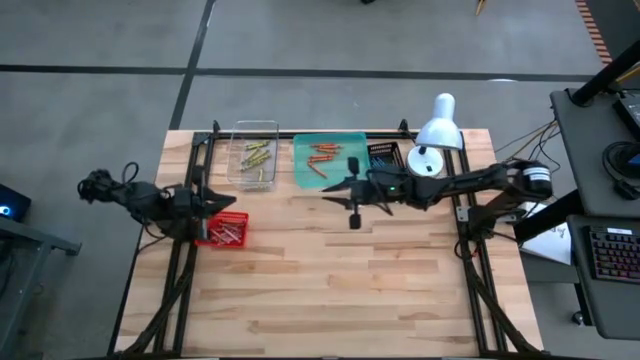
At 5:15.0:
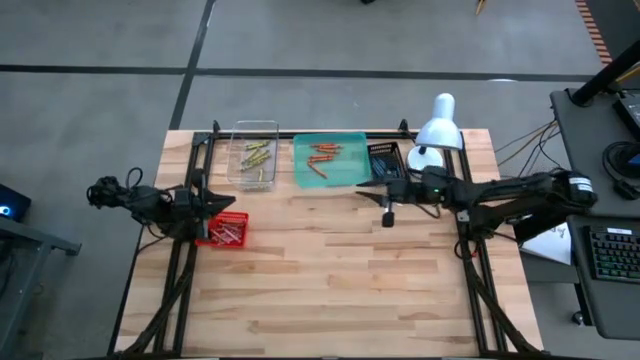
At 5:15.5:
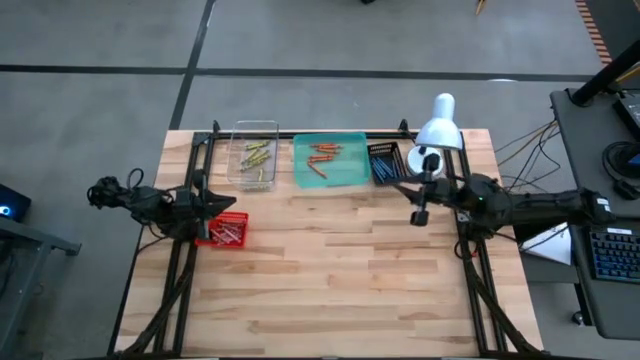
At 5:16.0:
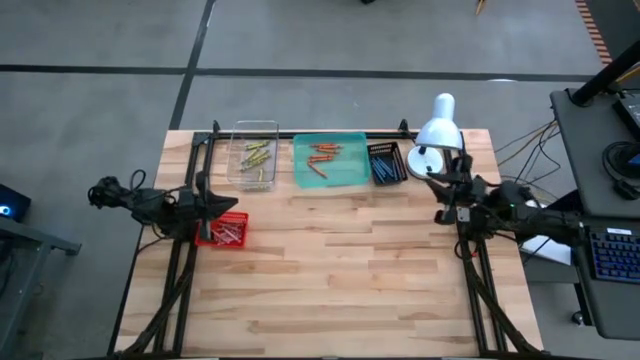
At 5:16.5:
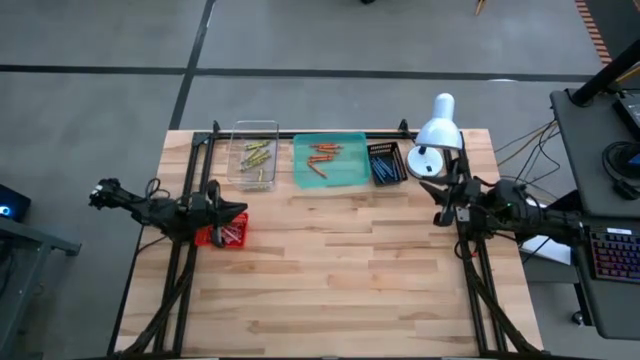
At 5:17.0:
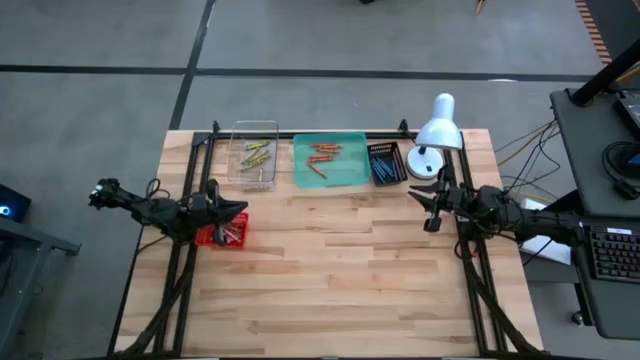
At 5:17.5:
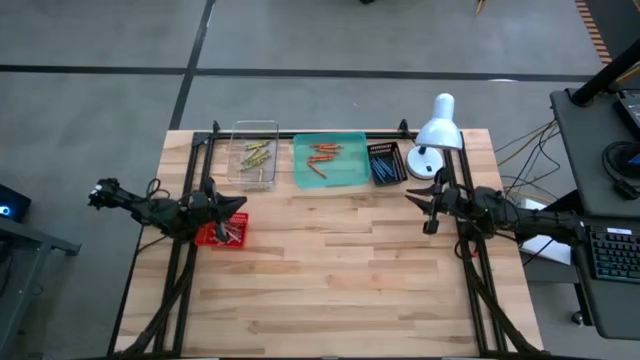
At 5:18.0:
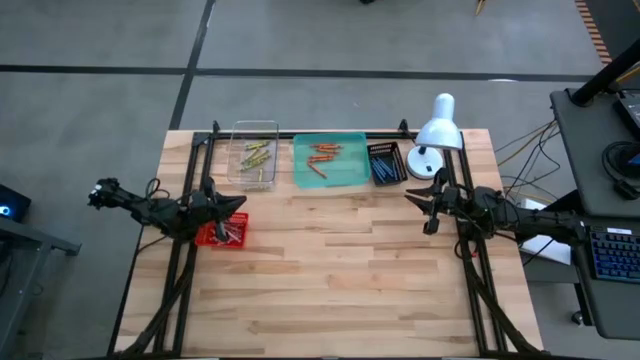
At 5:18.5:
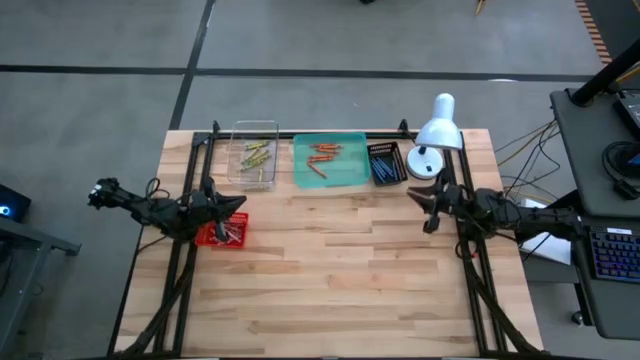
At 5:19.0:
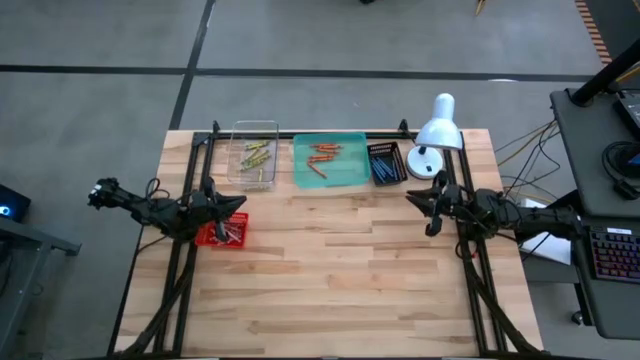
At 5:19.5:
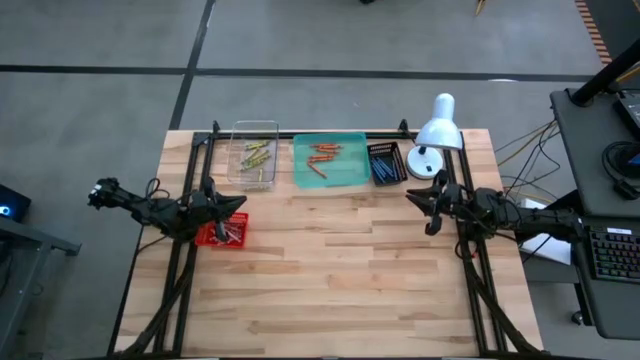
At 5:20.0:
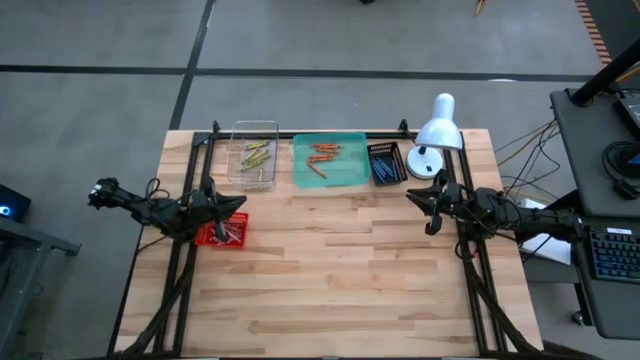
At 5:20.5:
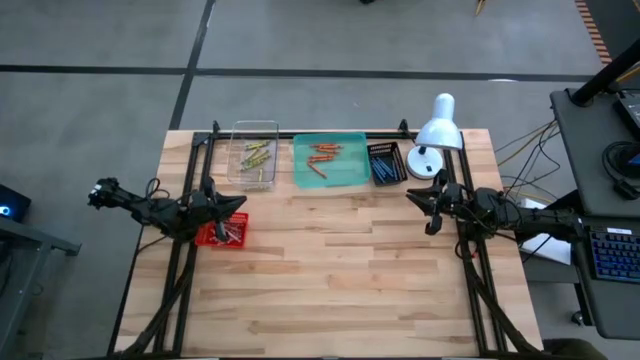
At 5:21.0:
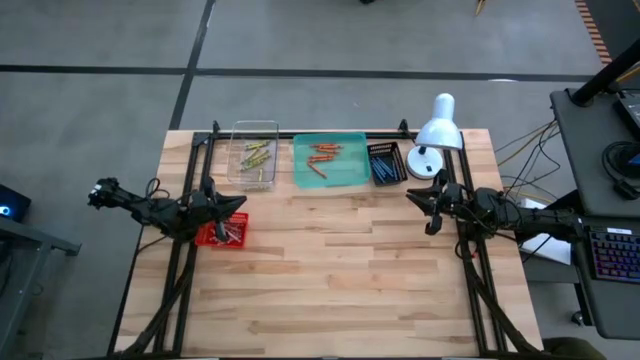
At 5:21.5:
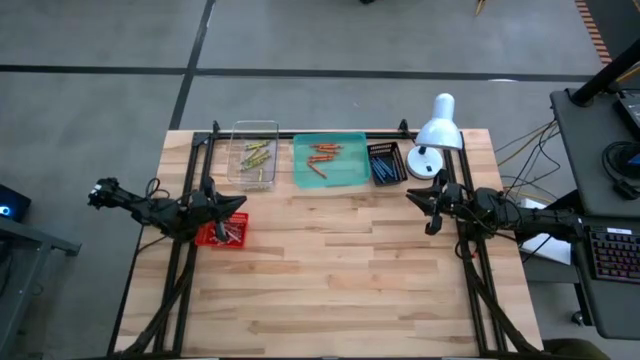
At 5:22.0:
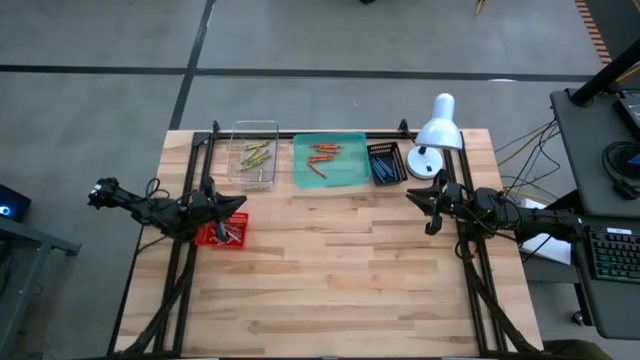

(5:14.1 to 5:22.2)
Task: Sort crayons
Return to Home Position

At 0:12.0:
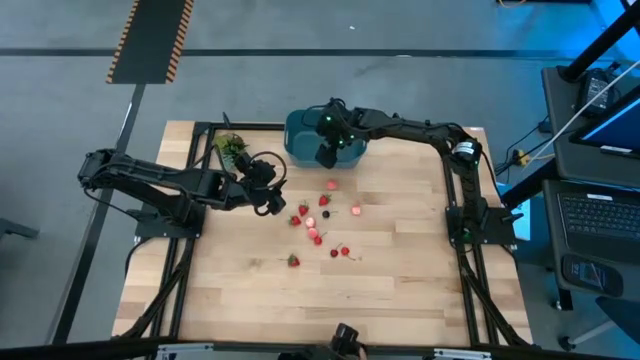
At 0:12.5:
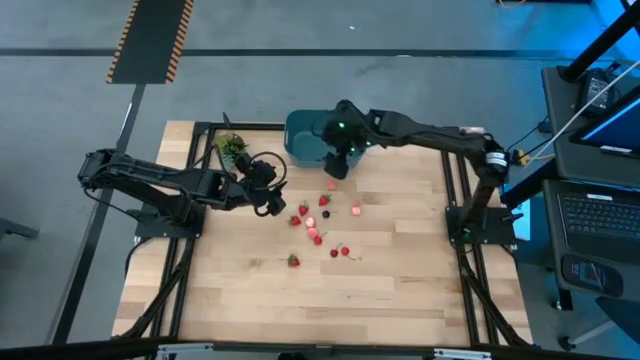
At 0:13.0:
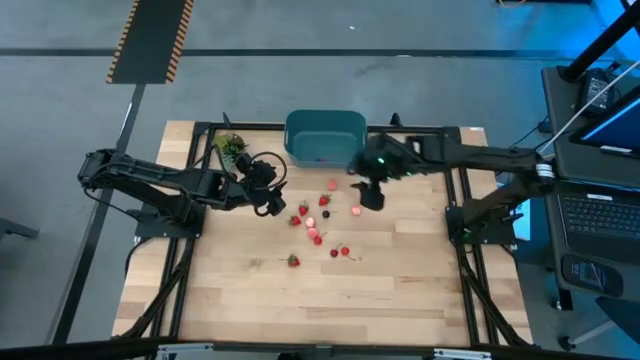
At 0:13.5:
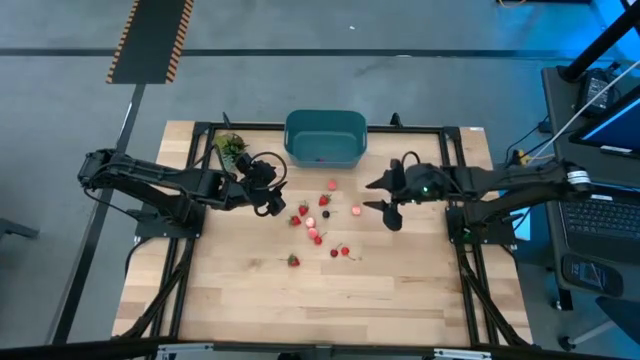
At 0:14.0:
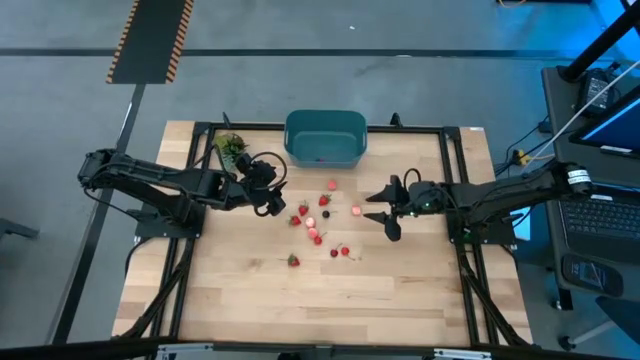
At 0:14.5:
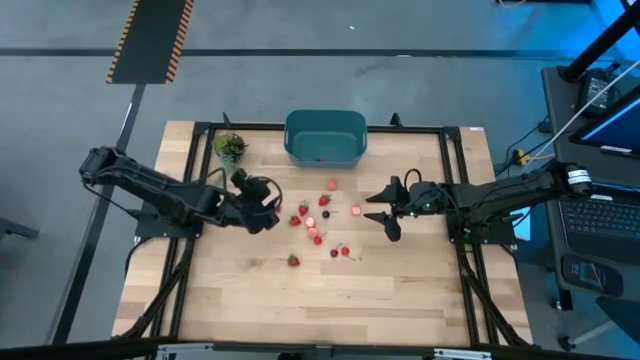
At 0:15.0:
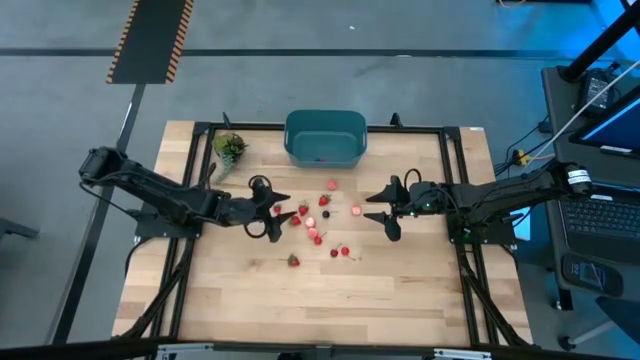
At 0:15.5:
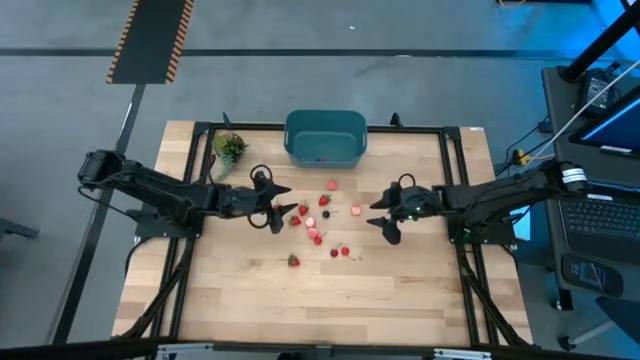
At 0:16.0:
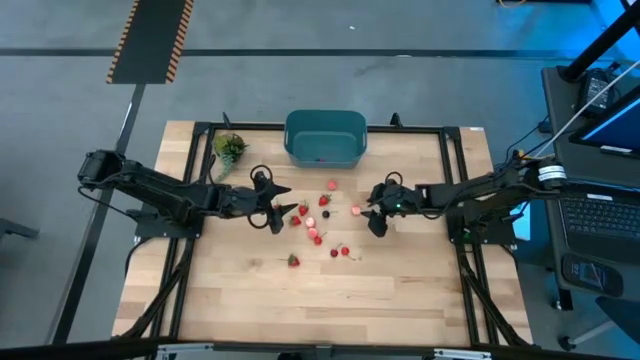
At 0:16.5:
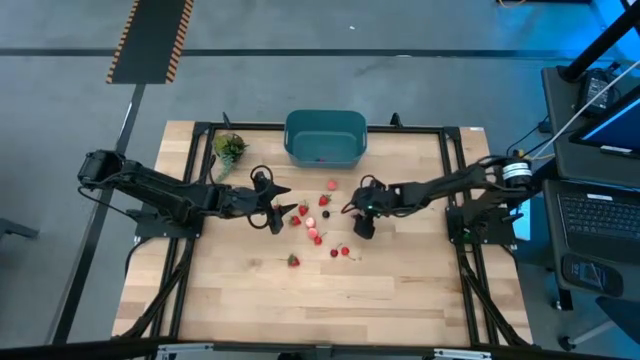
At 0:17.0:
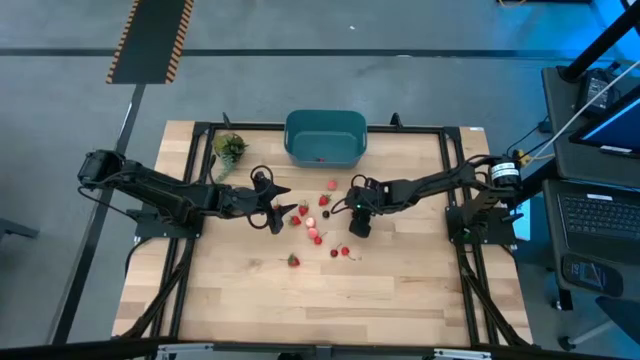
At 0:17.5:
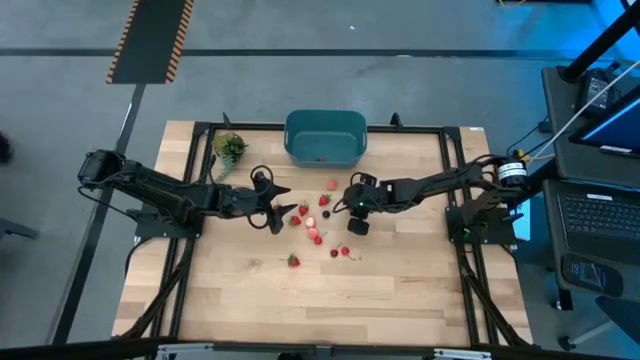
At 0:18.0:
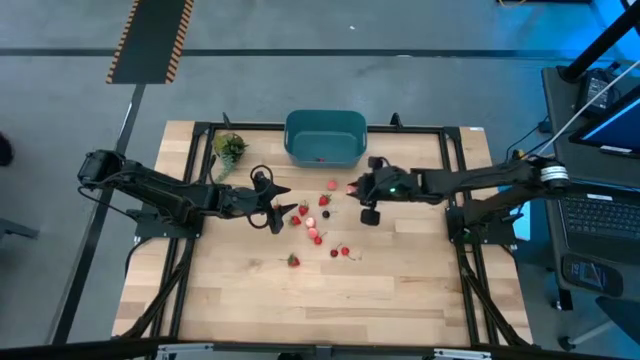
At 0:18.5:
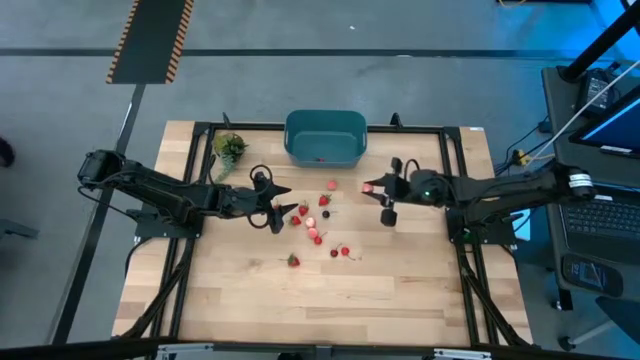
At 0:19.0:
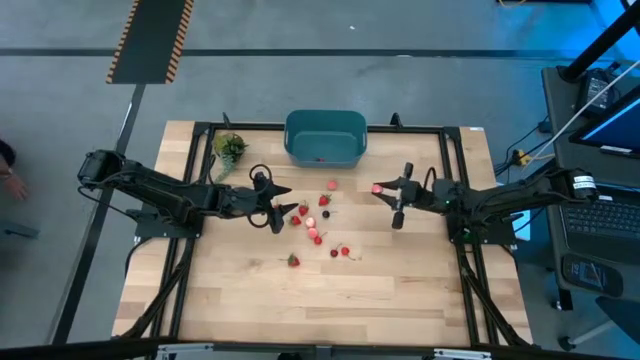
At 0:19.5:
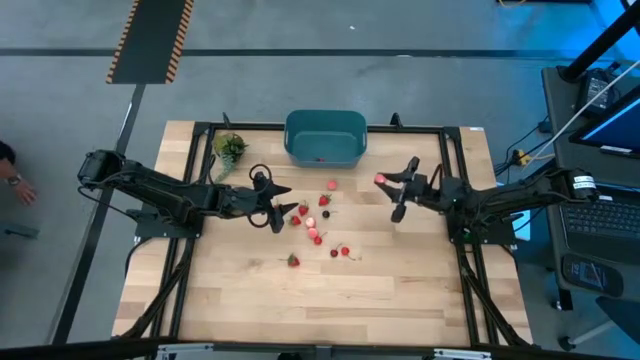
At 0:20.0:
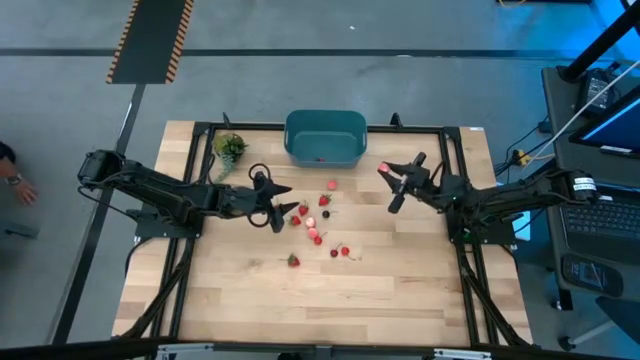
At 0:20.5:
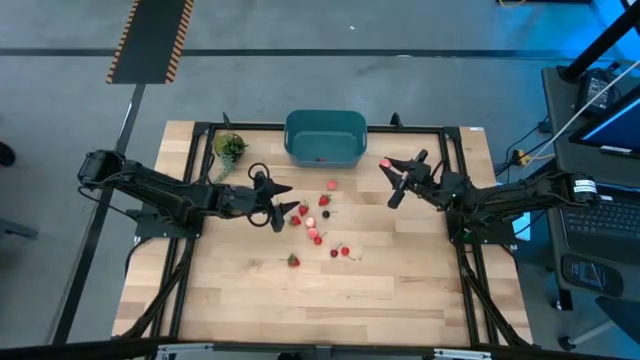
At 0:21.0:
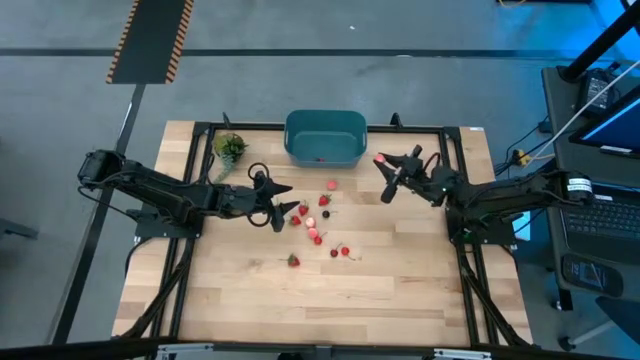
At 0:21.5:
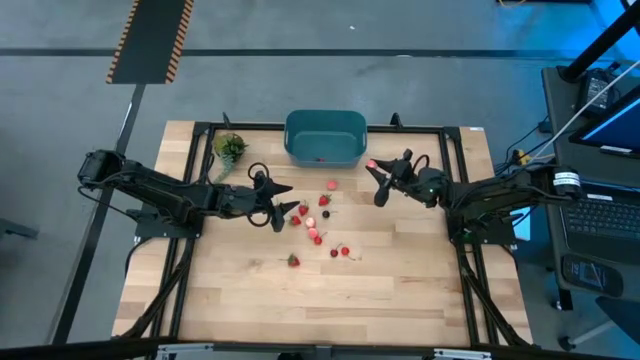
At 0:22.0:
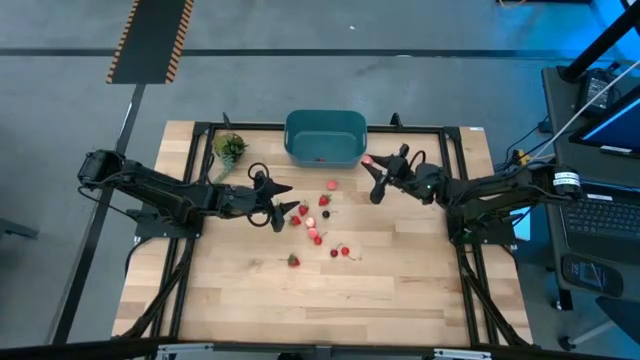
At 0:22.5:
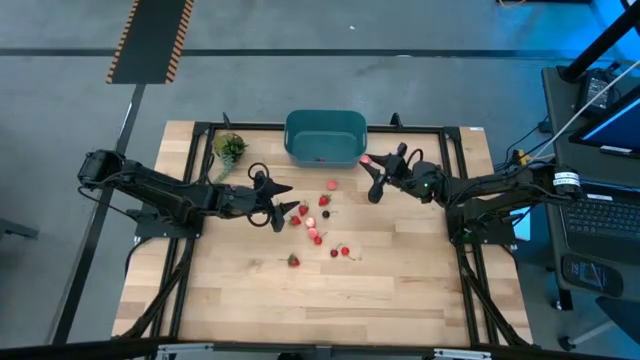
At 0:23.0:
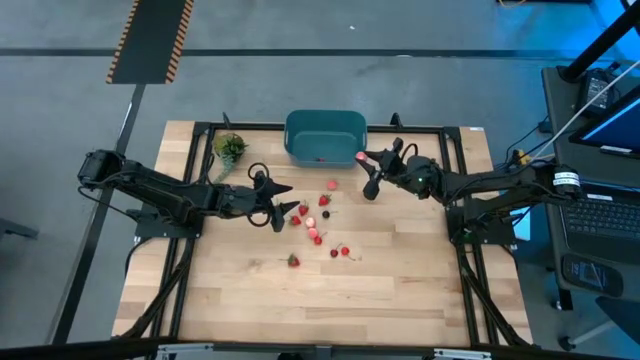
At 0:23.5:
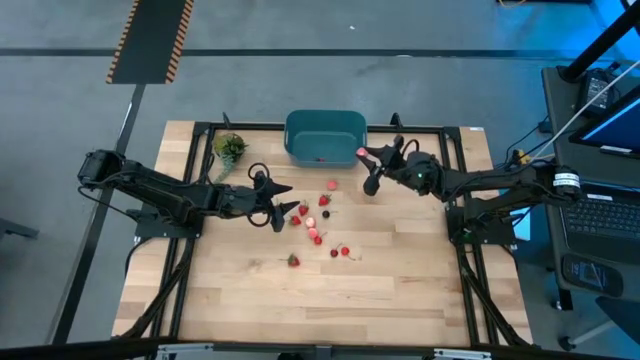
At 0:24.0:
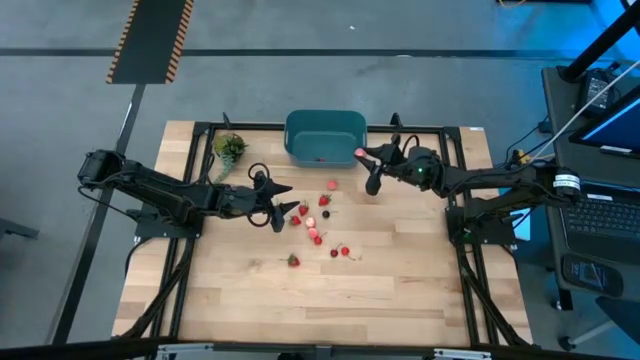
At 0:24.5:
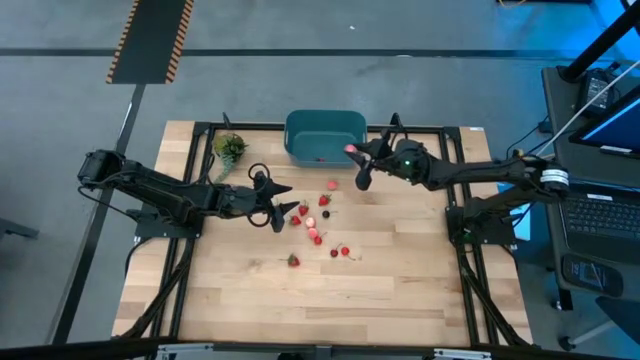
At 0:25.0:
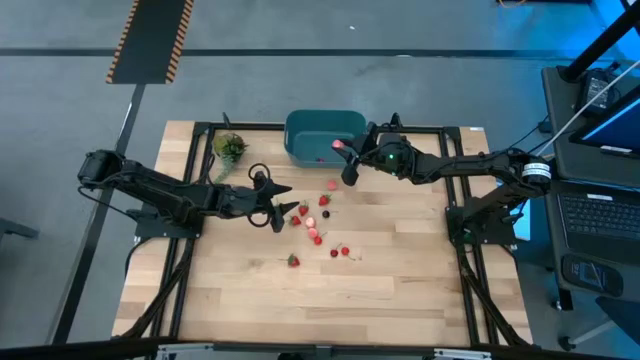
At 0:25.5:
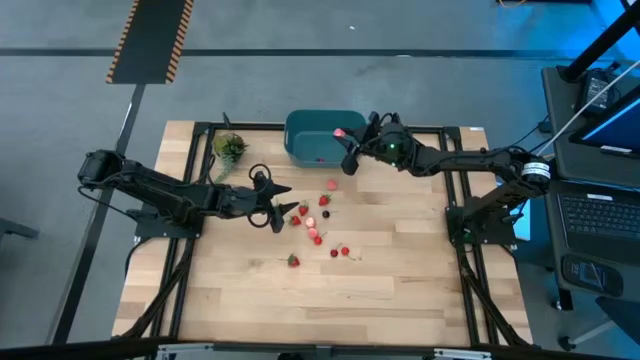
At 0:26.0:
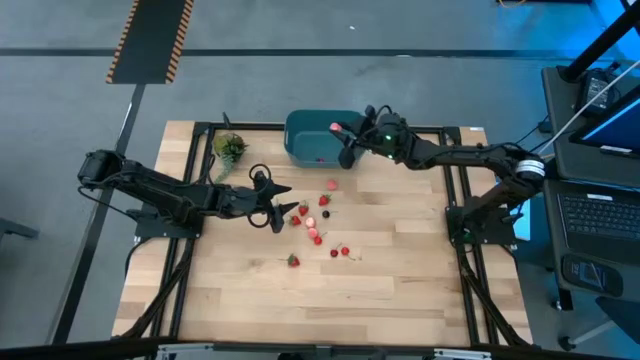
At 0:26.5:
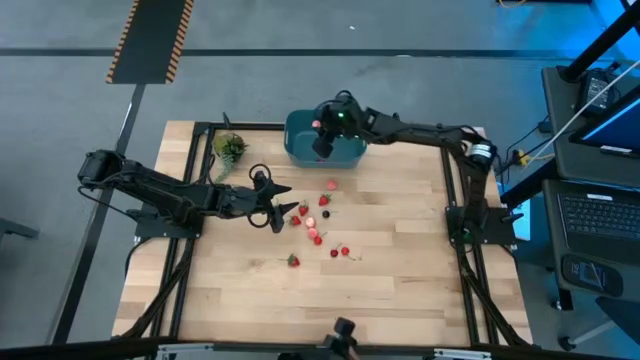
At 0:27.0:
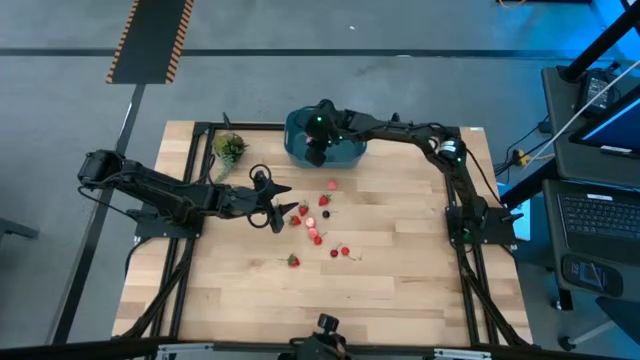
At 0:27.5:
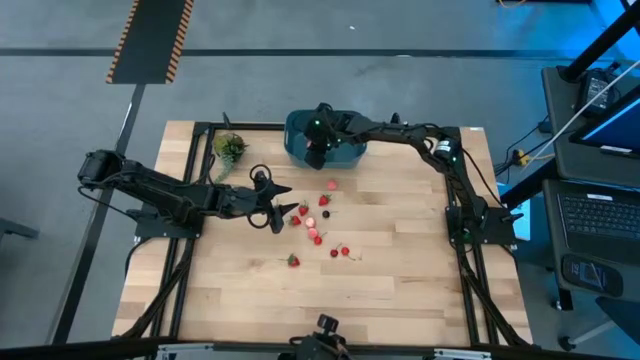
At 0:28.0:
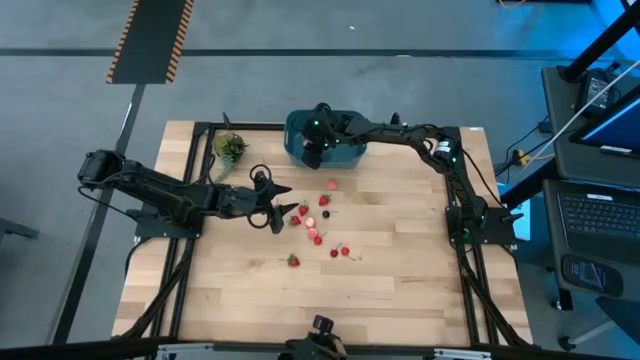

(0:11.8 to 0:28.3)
Task: Pick and placing Produce into tupperware
Put the peach into the blue bin
